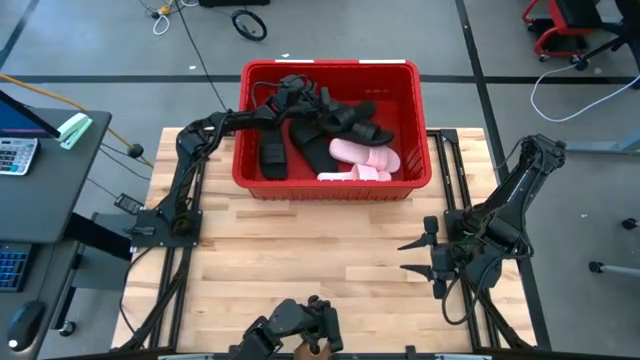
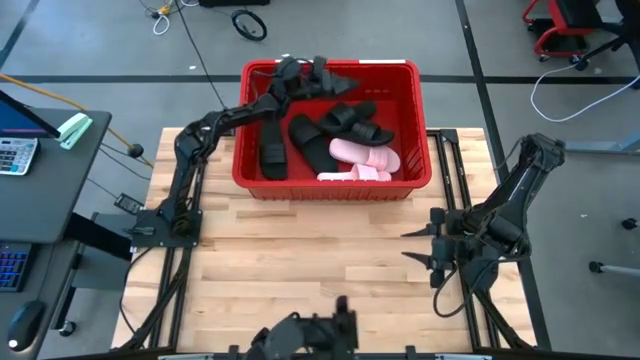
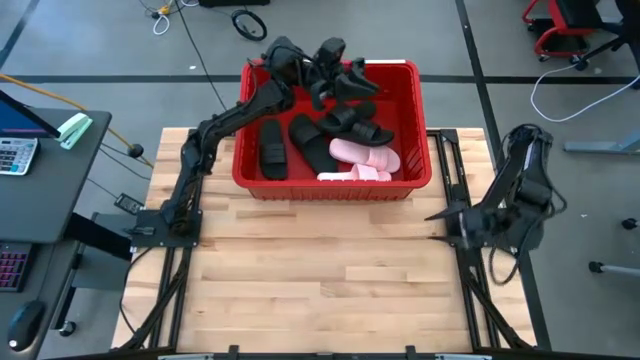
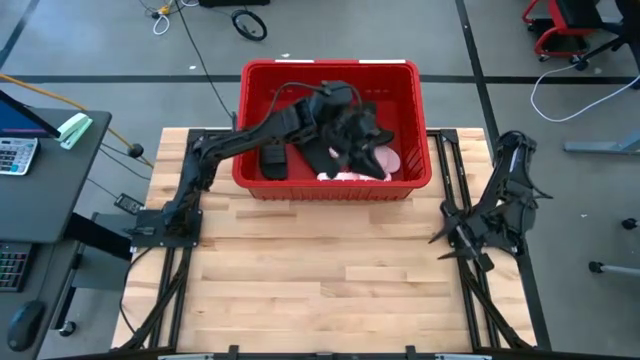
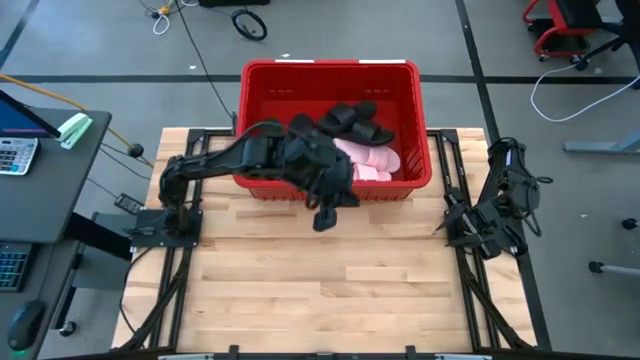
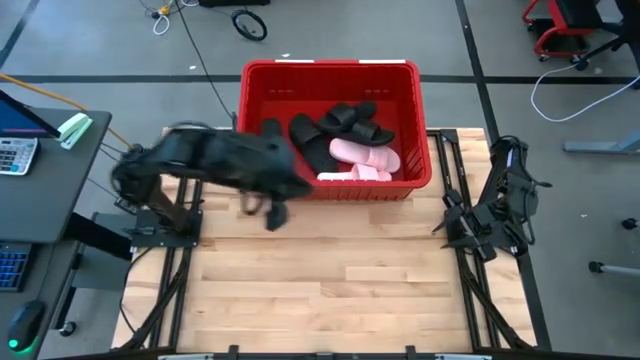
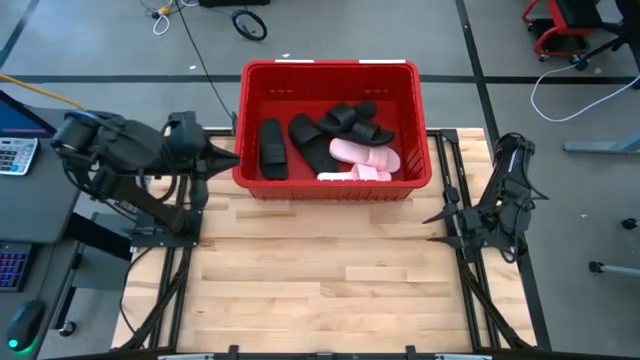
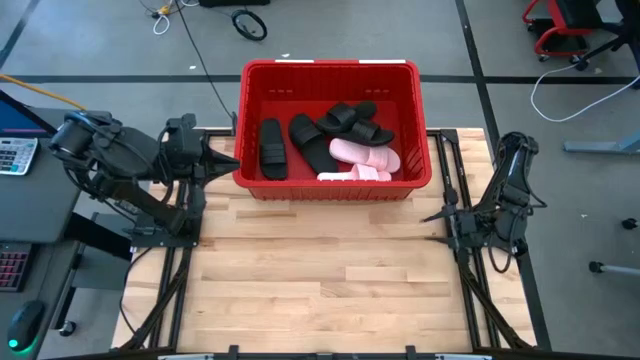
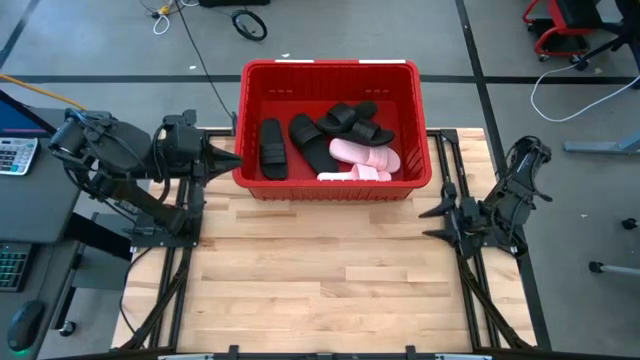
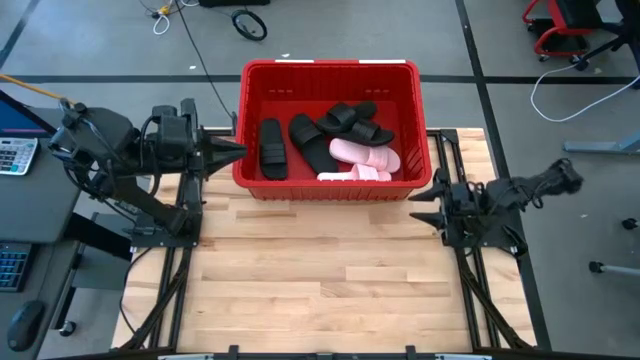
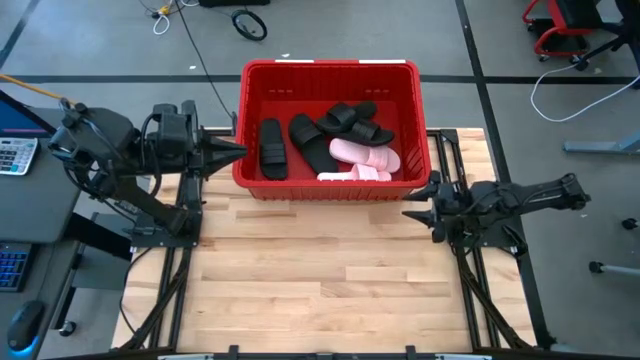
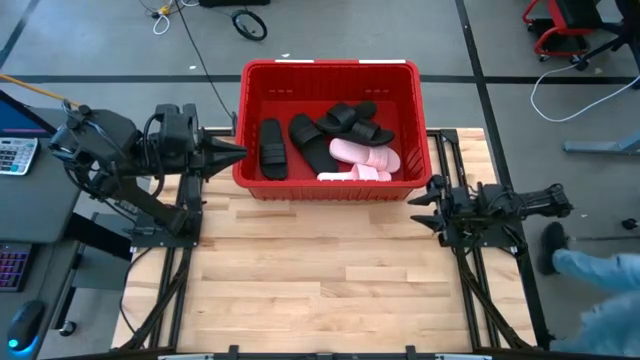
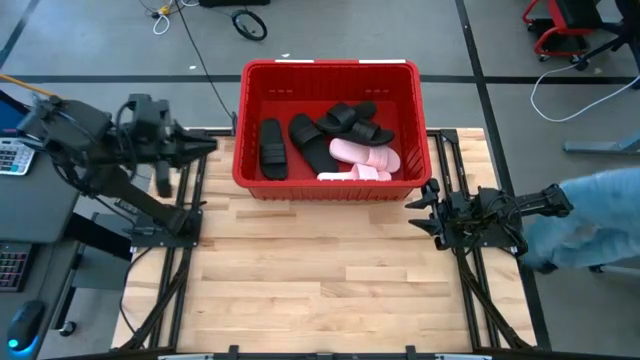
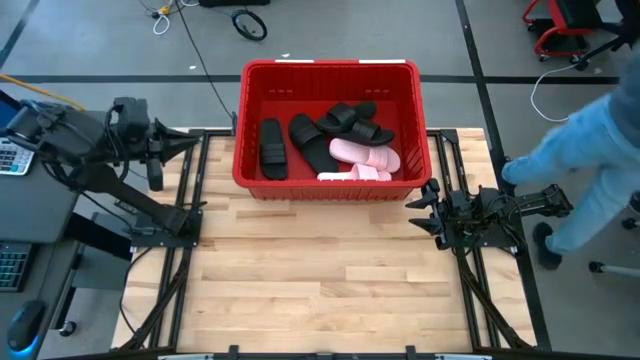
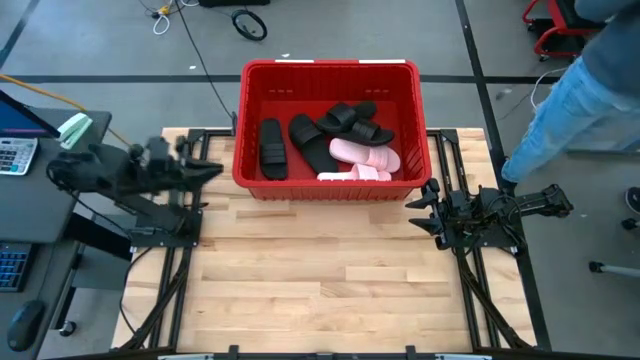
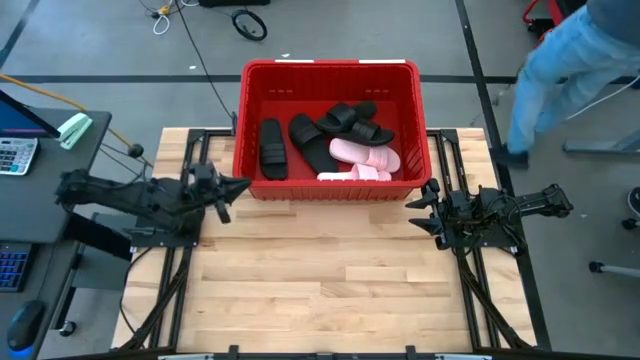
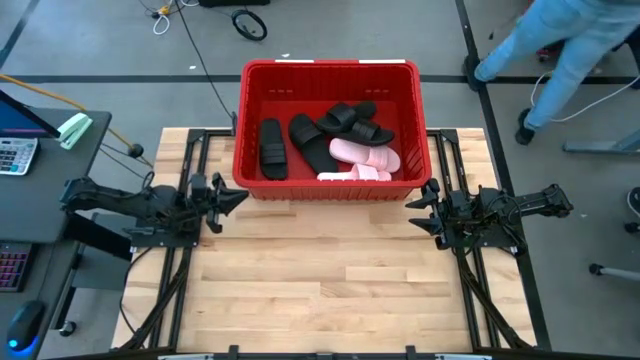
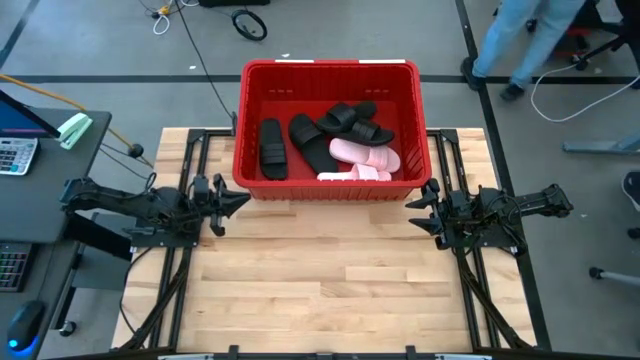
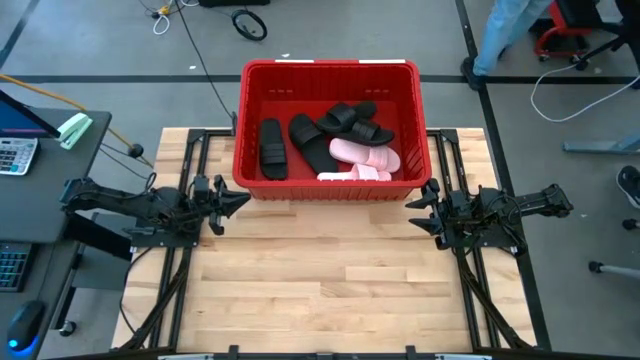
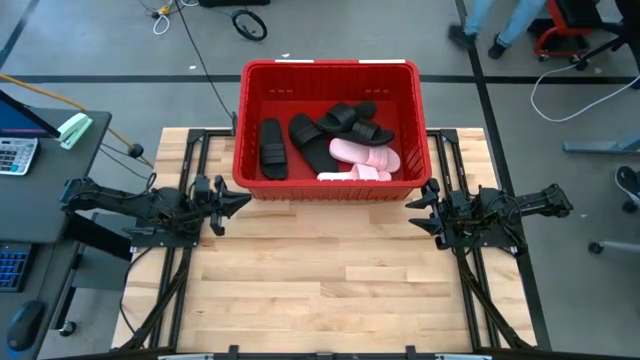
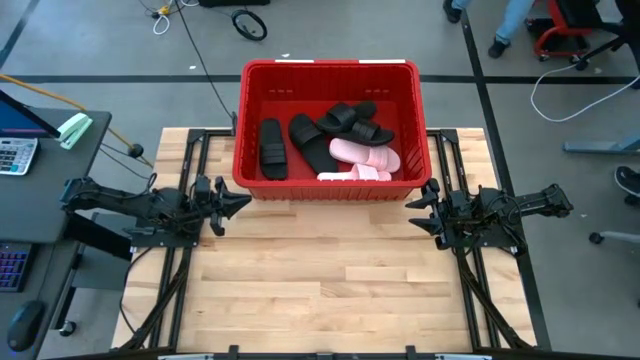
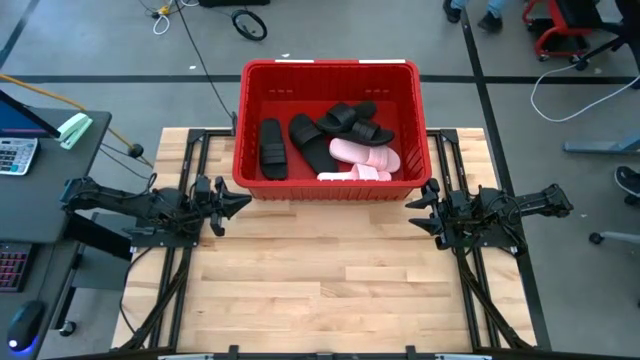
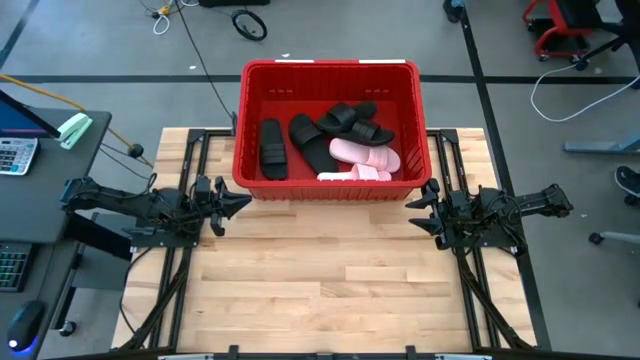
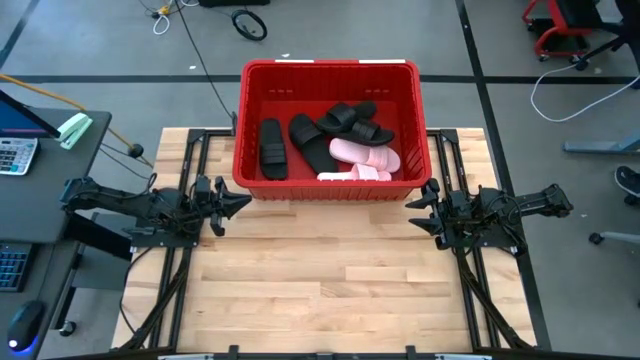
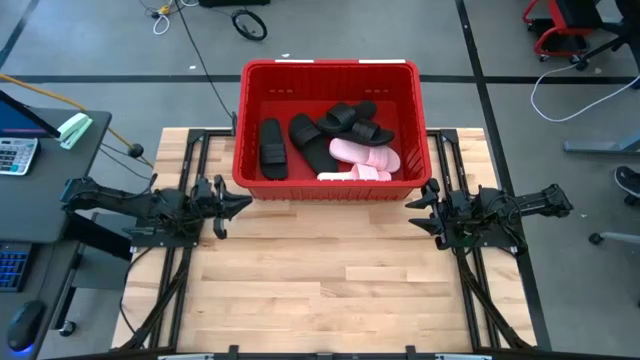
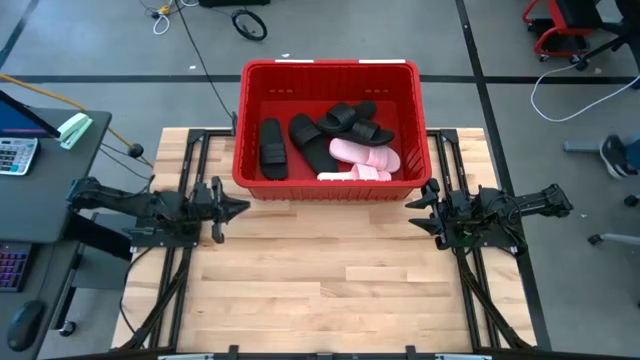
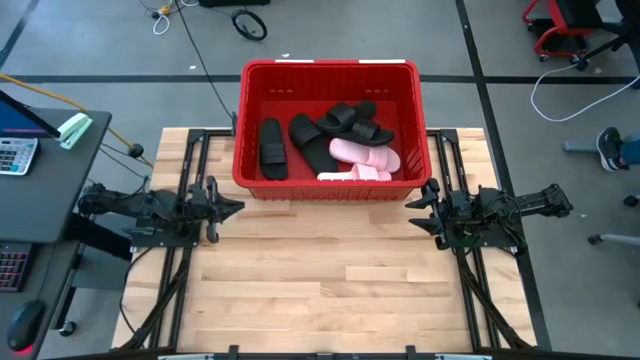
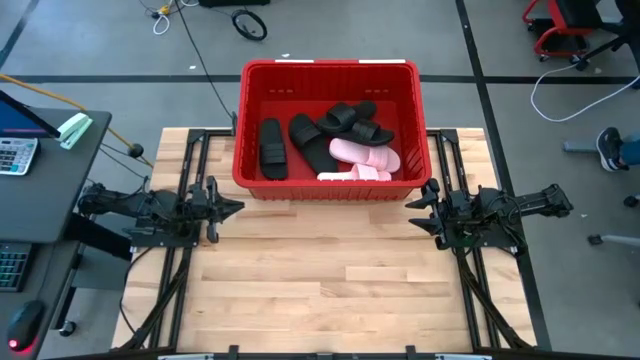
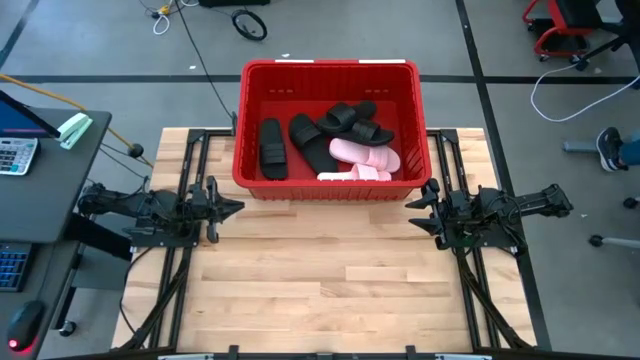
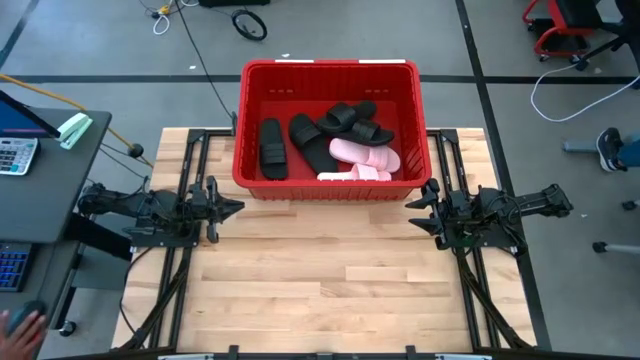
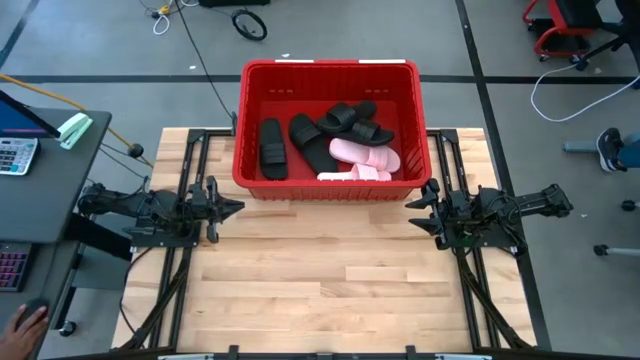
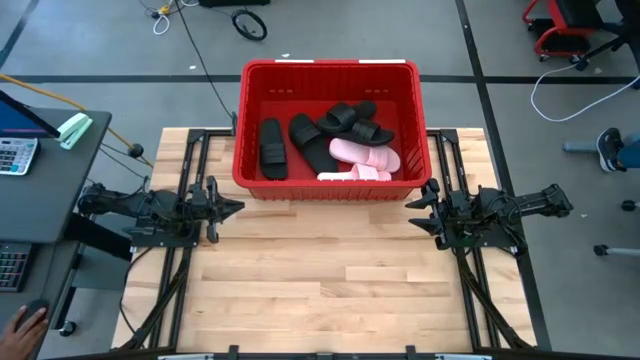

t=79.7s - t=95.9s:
Task: Pick and place slides into bin
Return to Home Position

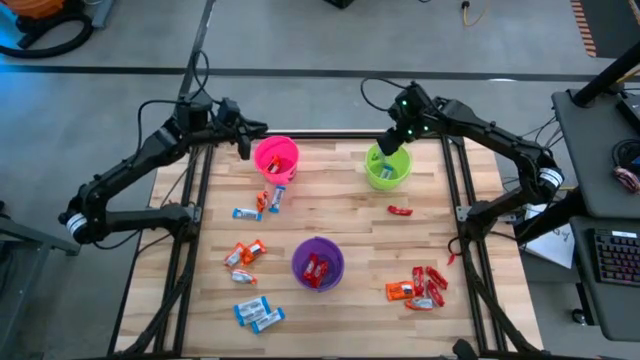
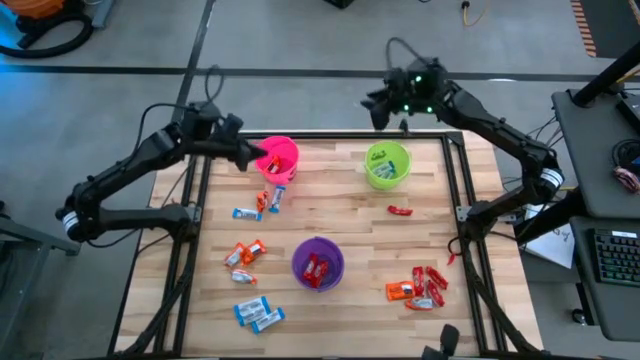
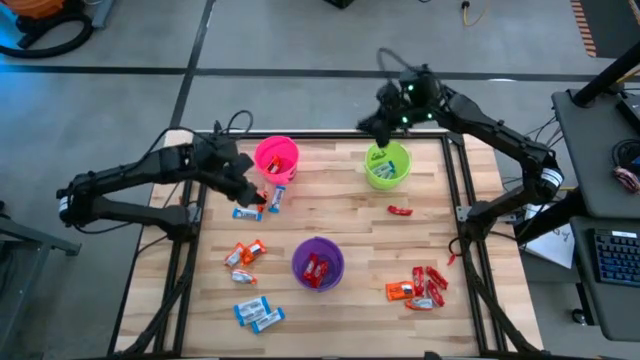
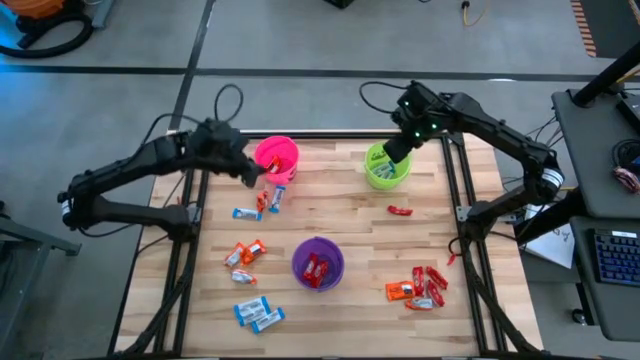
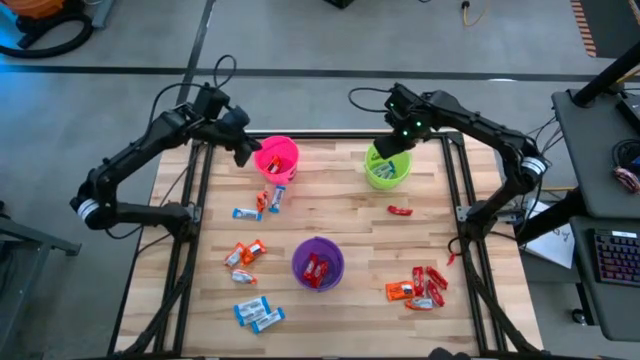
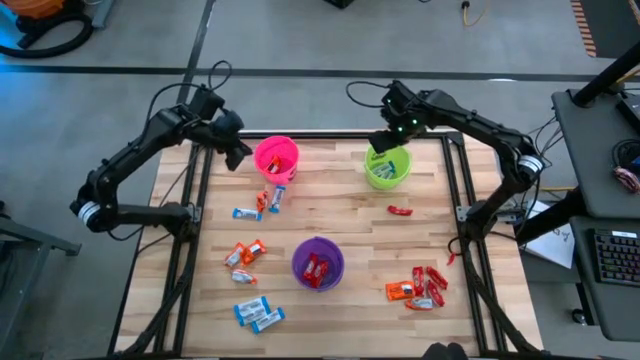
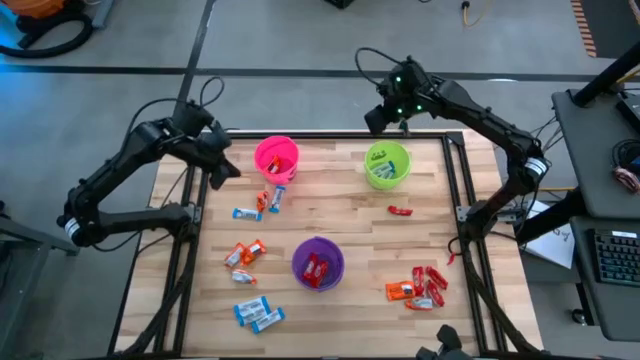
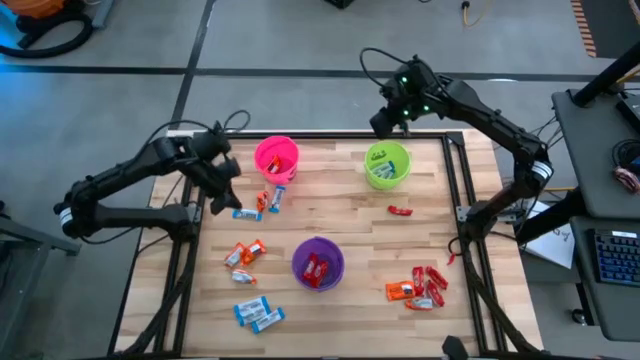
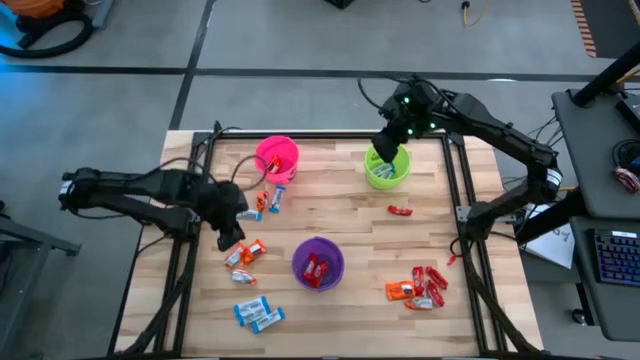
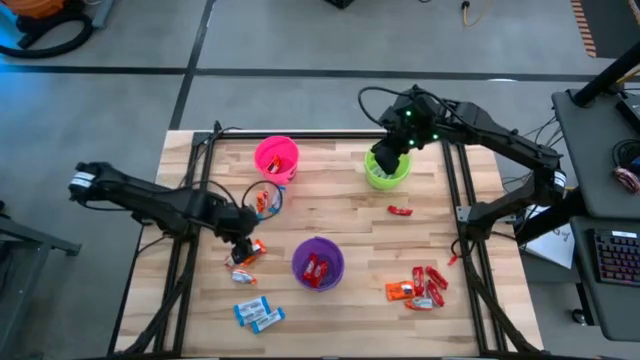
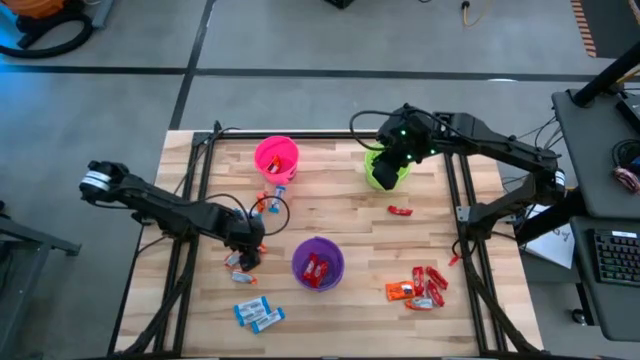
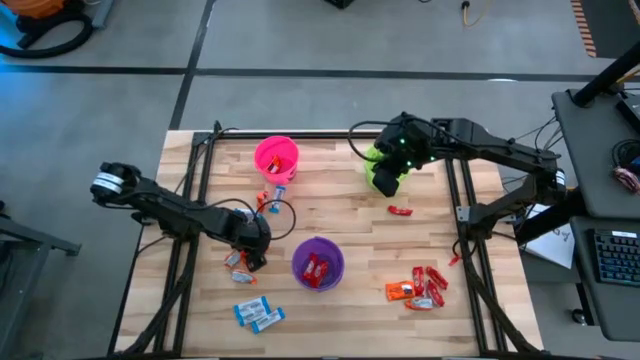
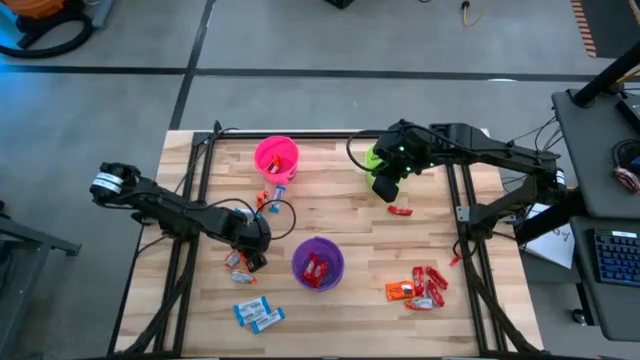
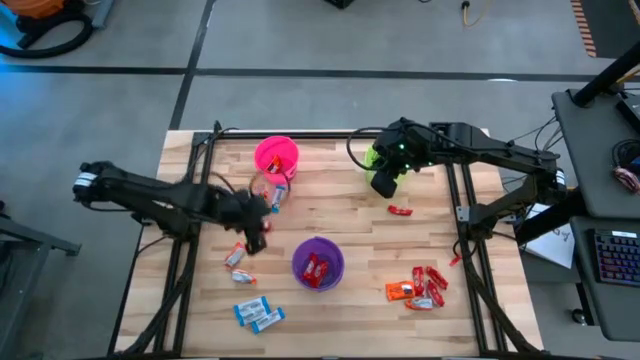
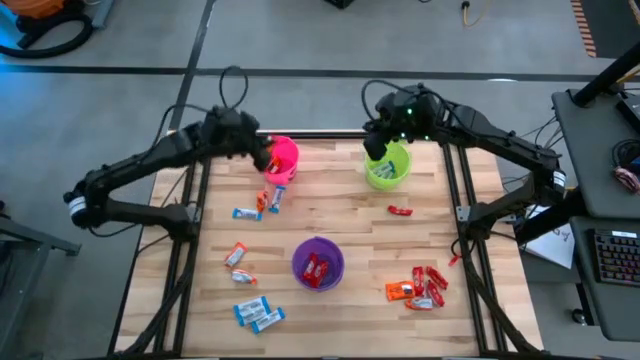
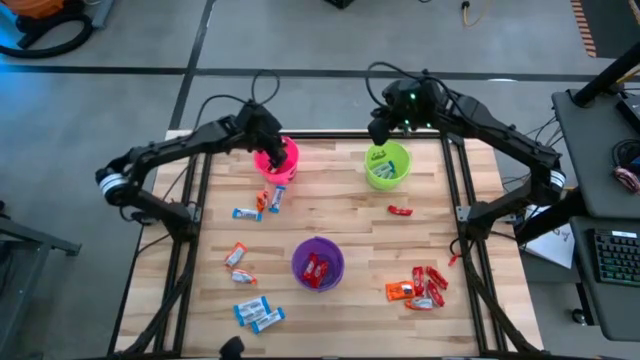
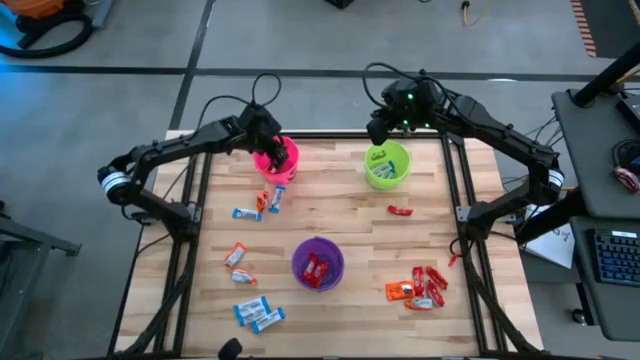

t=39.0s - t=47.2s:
Task: Sort candy
Put the orange chocolate into the pink bucket
